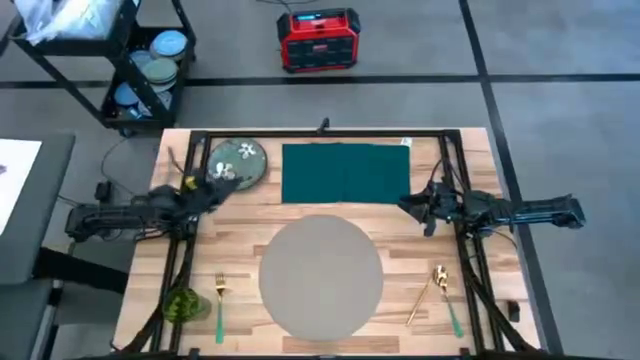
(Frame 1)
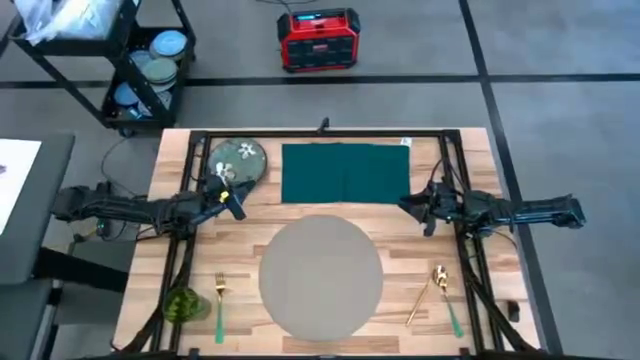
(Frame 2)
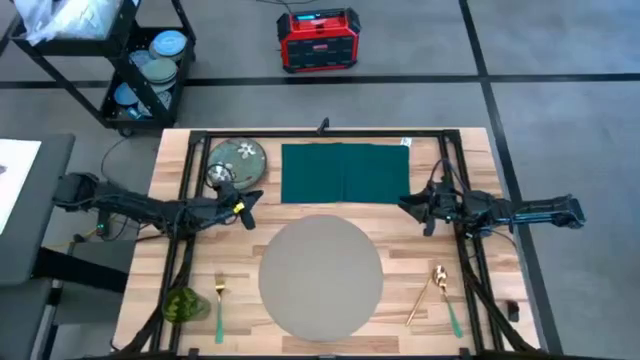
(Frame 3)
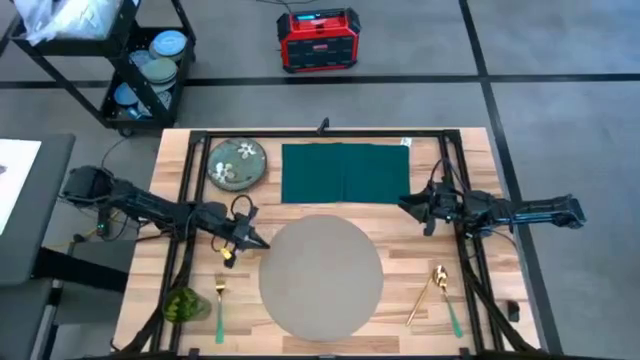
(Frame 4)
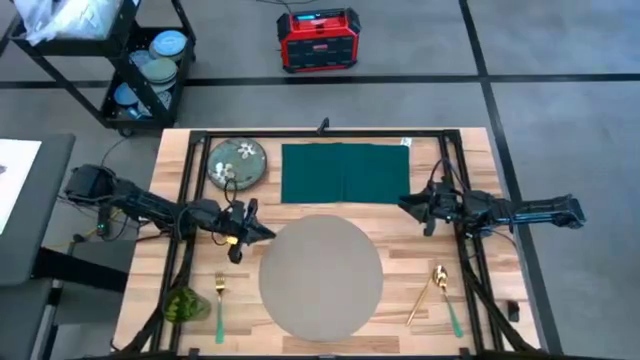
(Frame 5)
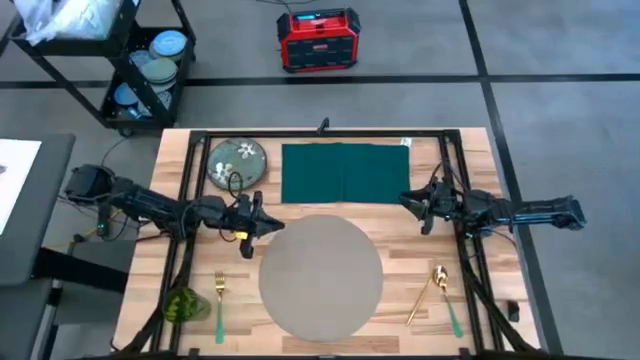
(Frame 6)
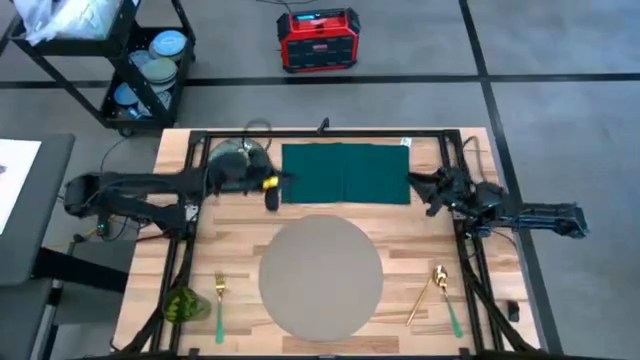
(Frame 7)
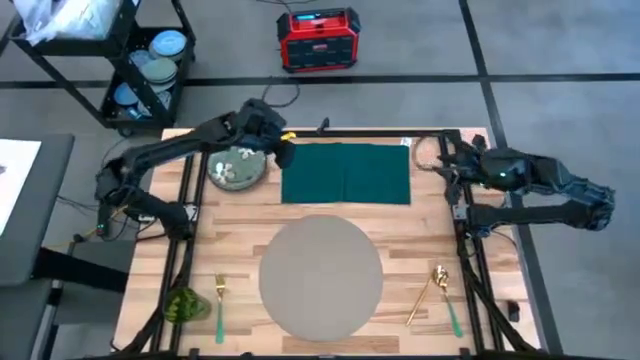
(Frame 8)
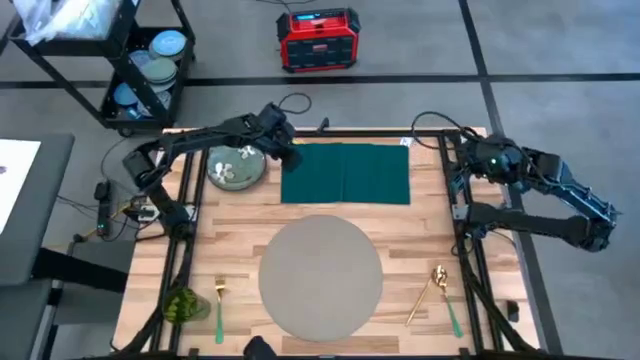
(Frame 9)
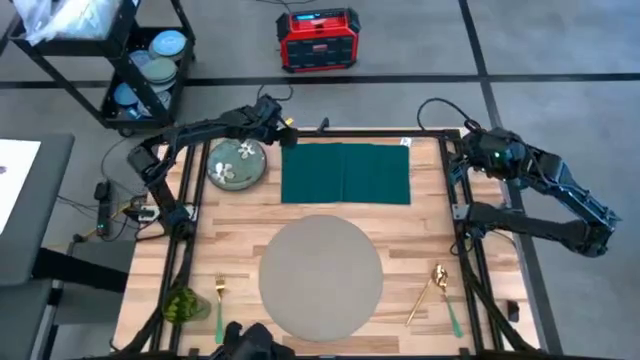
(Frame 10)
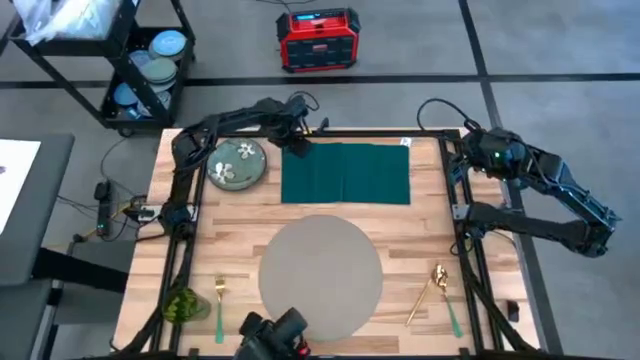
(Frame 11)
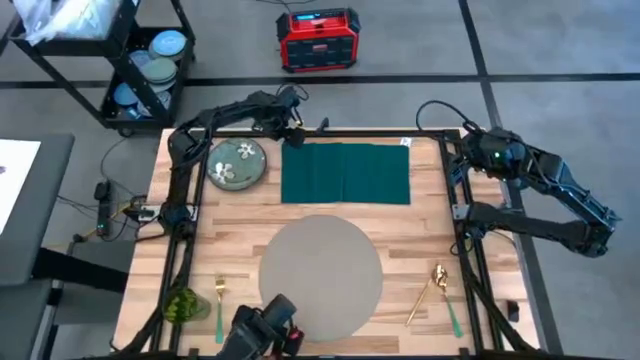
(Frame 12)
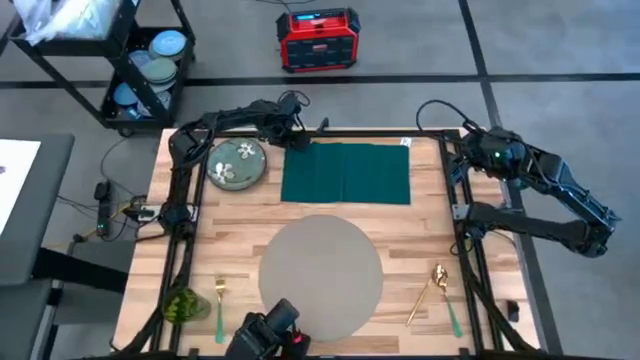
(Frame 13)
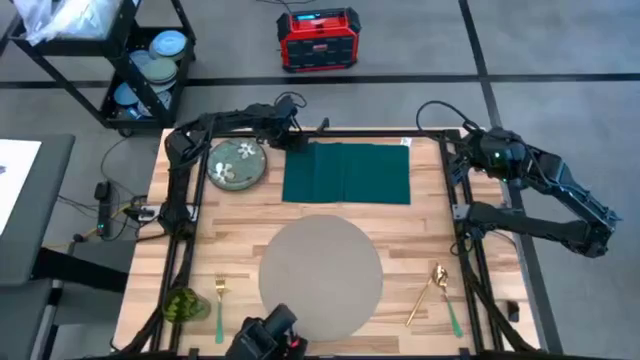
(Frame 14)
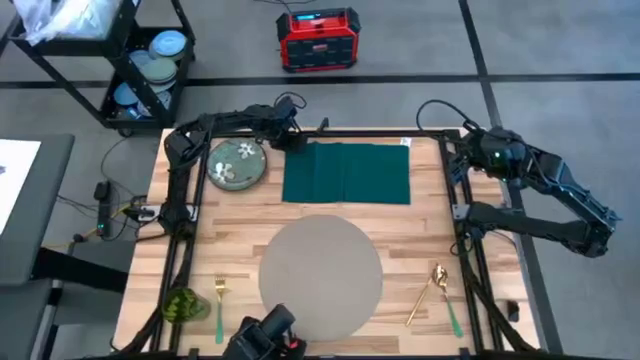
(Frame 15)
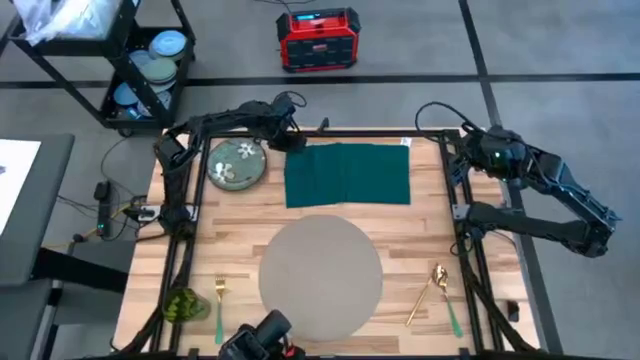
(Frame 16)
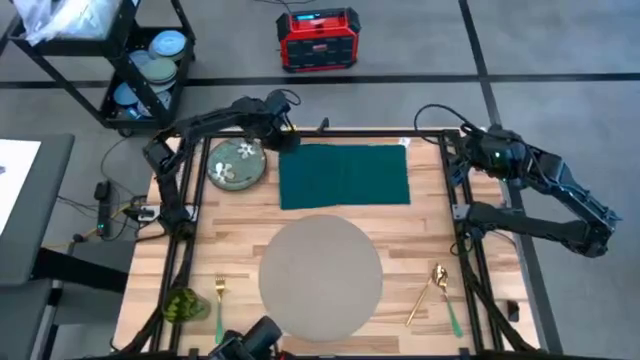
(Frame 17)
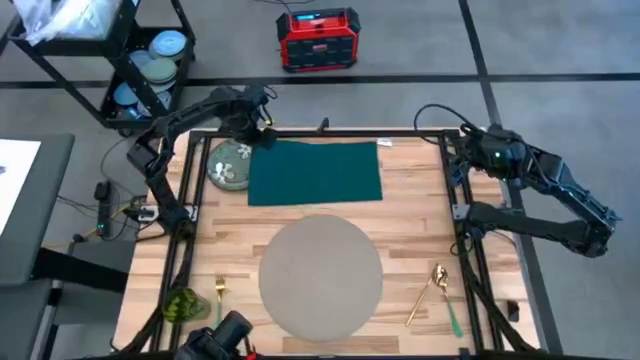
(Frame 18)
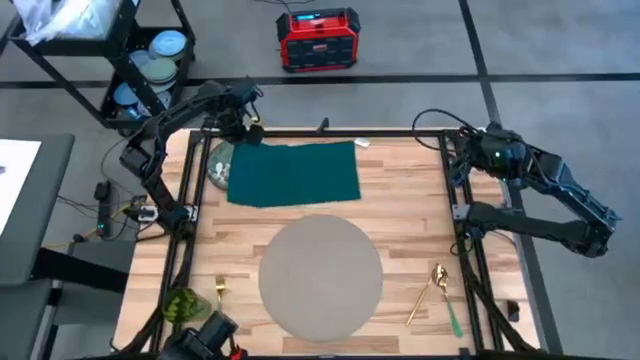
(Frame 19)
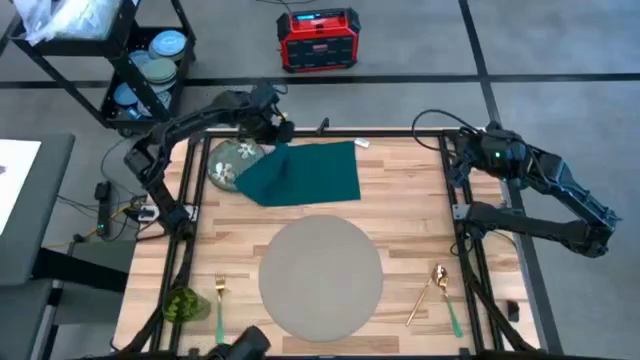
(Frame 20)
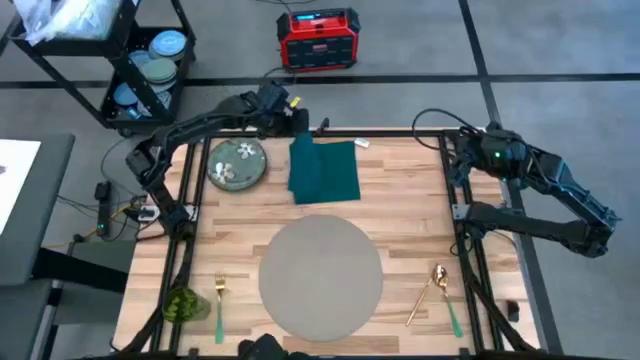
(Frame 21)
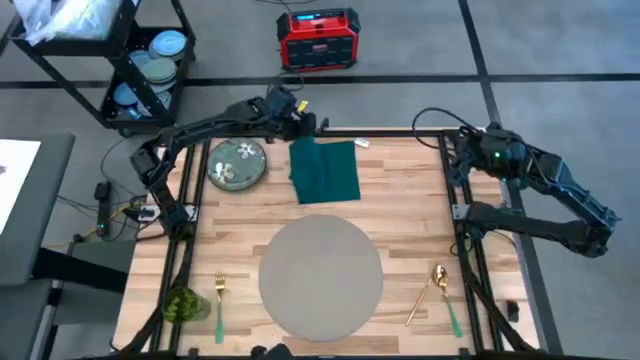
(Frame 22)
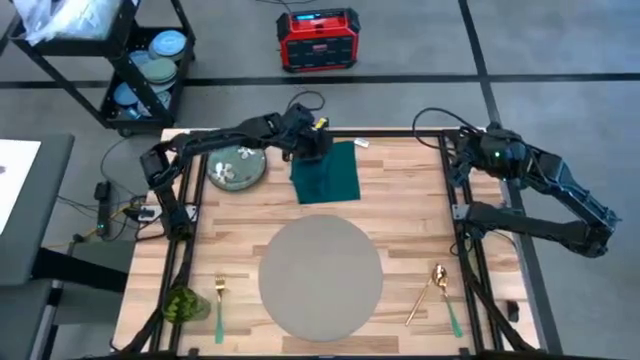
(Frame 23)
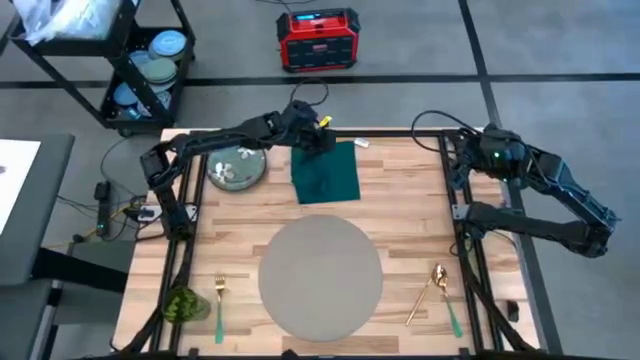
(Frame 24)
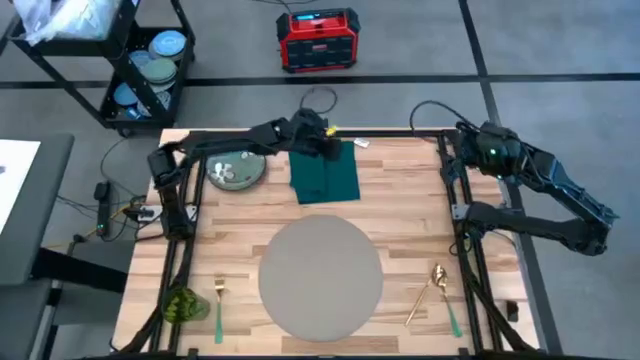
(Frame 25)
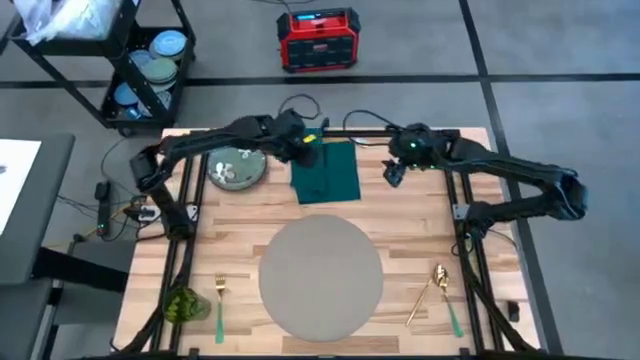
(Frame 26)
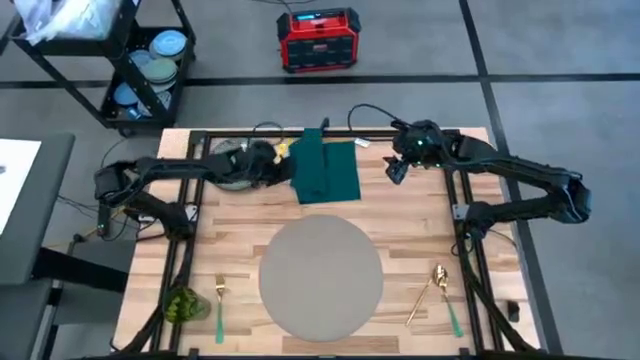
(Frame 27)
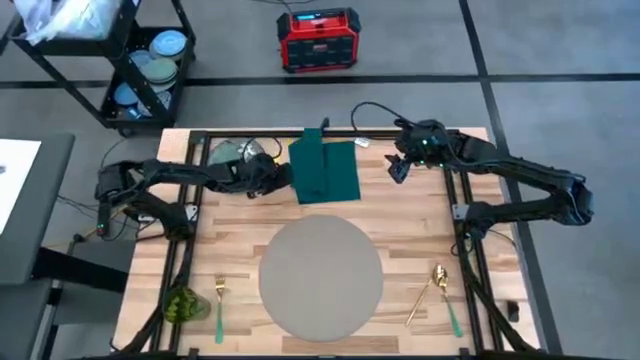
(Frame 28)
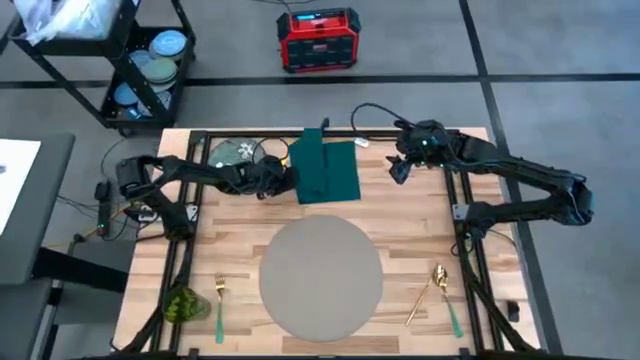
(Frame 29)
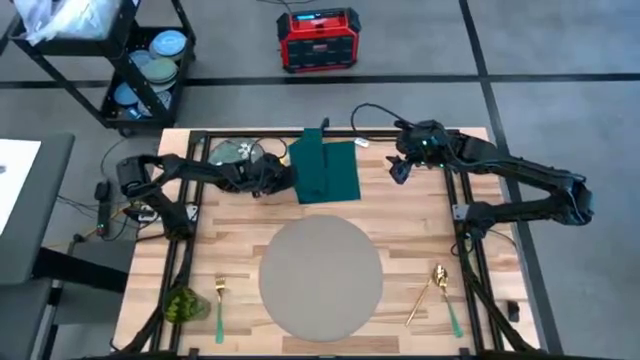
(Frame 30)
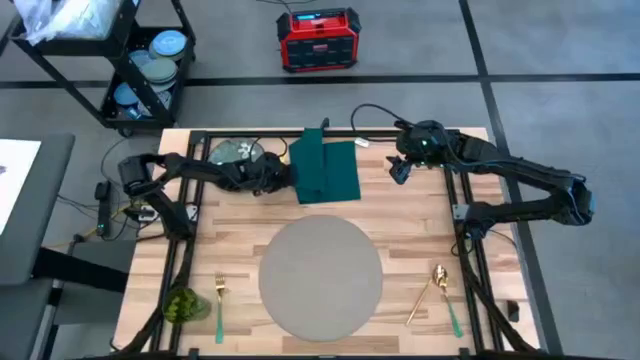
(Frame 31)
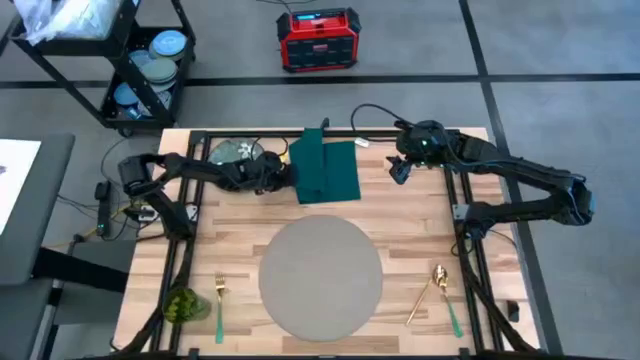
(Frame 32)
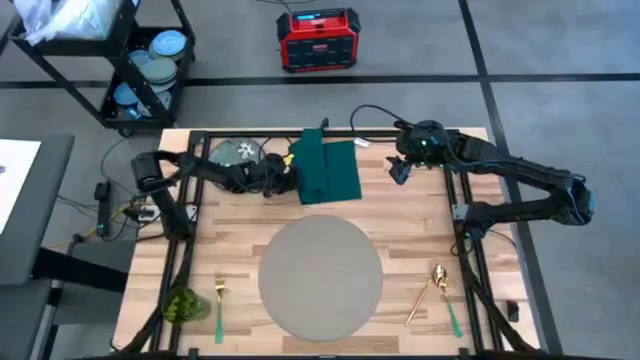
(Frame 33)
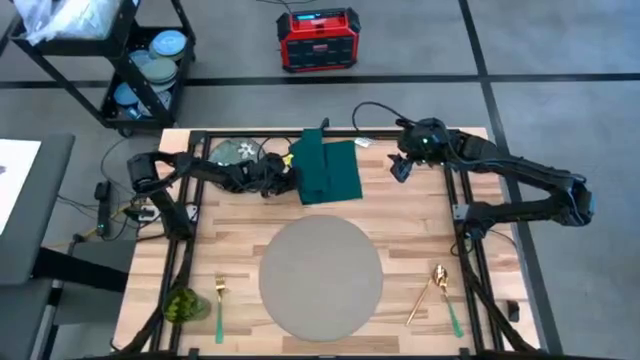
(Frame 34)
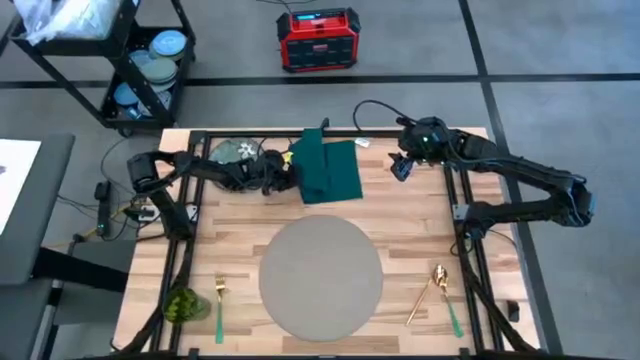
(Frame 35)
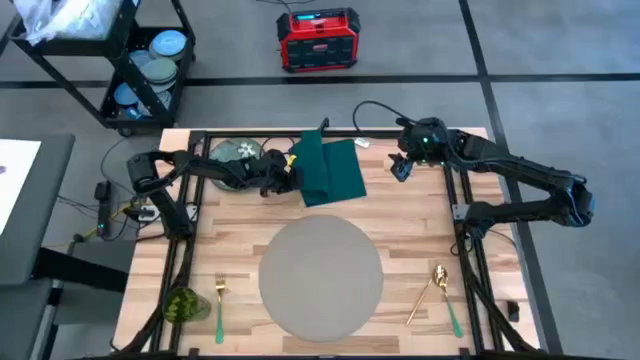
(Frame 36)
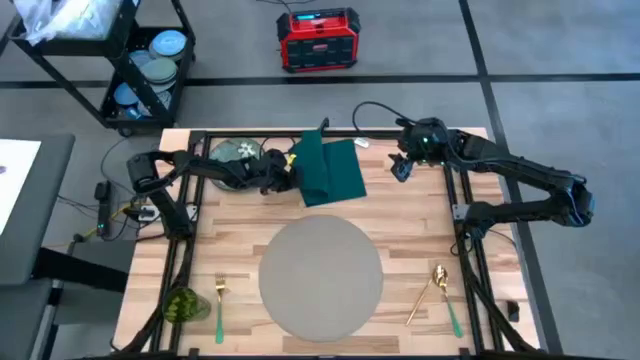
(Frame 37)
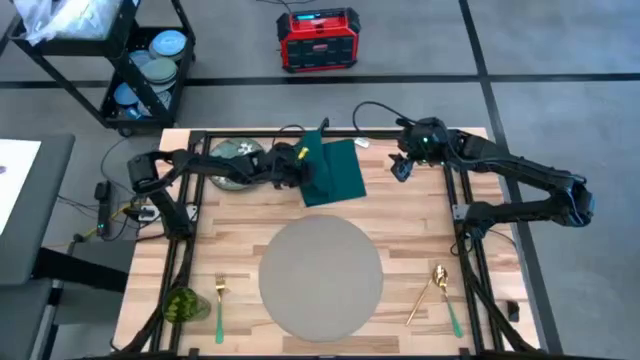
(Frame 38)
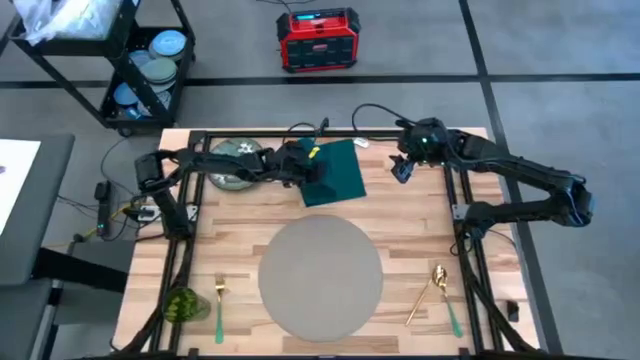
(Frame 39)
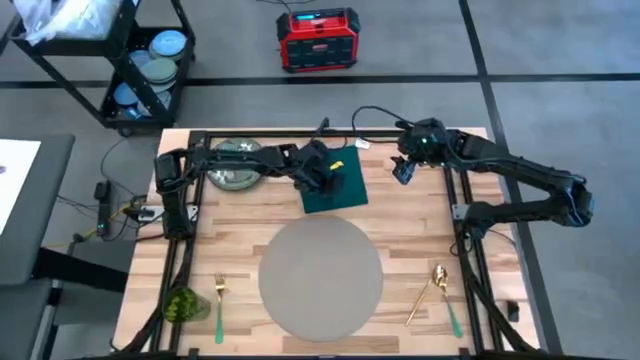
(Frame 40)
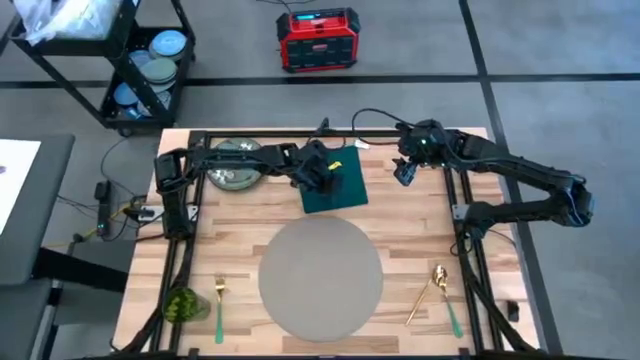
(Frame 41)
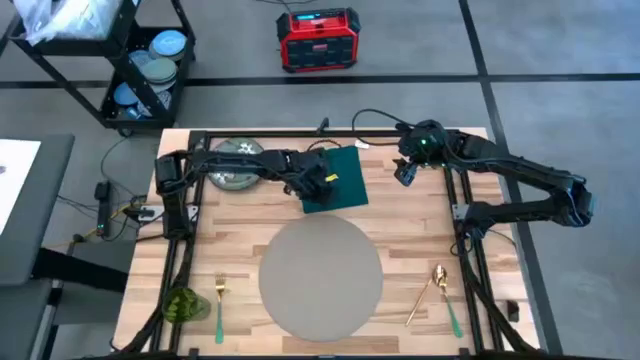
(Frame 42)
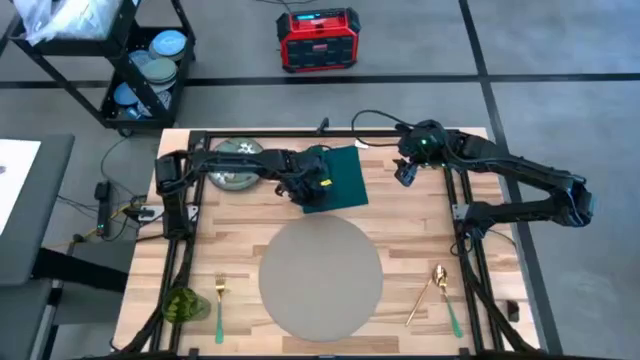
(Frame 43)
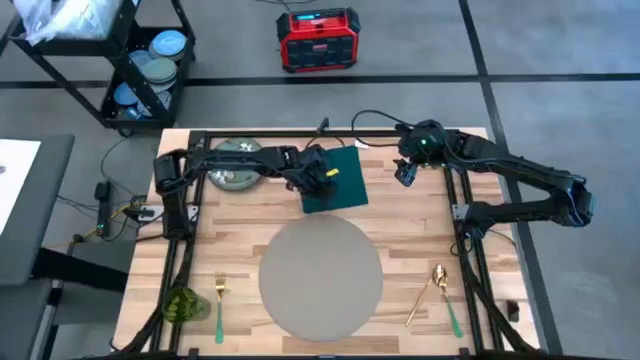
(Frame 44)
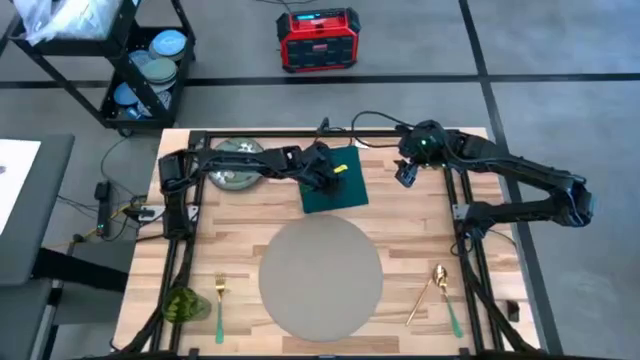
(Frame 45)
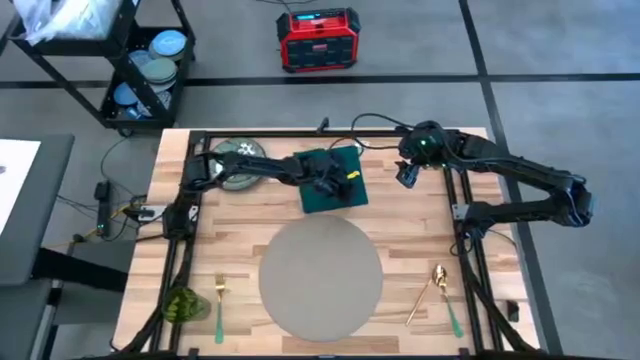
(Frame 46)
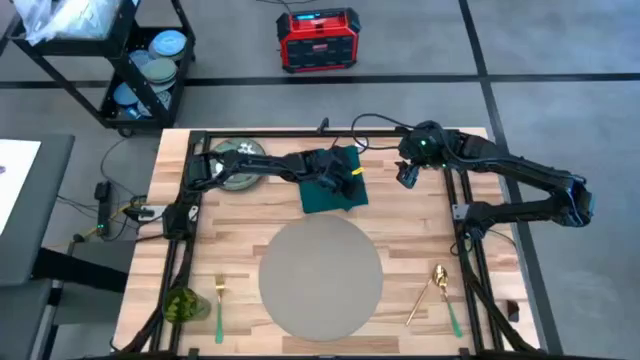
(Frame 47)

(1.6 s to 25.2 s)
Task: Set table place
Fold the blue table napkin
